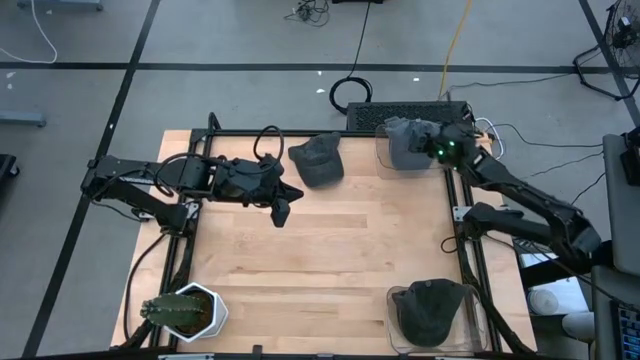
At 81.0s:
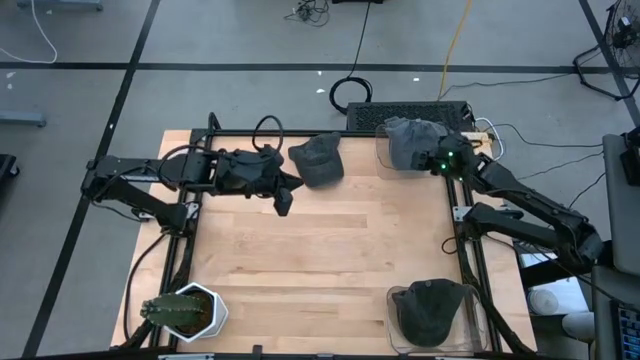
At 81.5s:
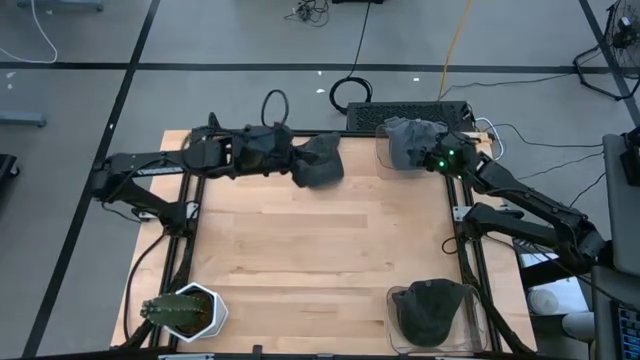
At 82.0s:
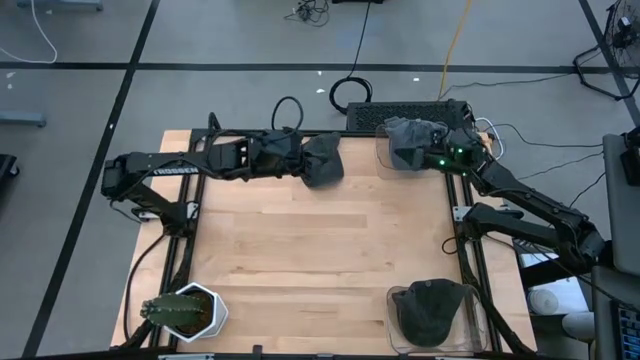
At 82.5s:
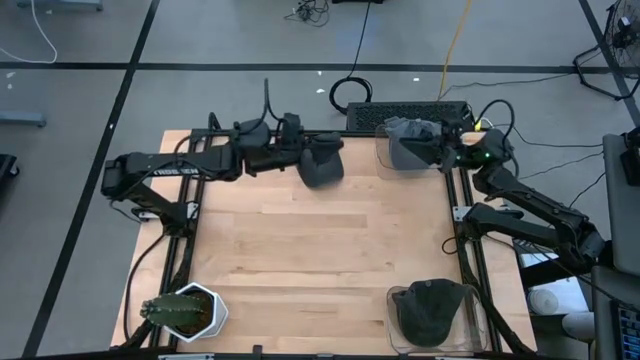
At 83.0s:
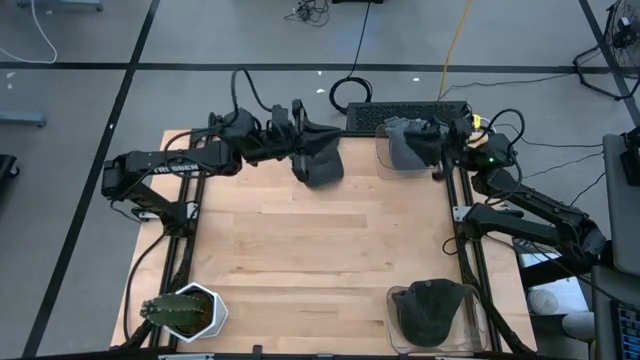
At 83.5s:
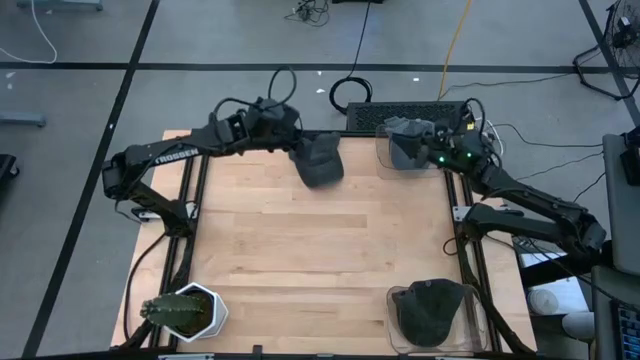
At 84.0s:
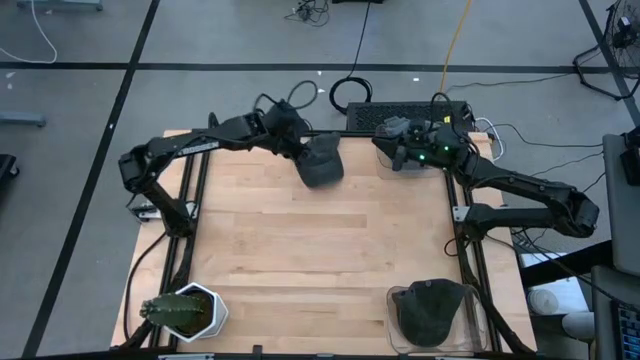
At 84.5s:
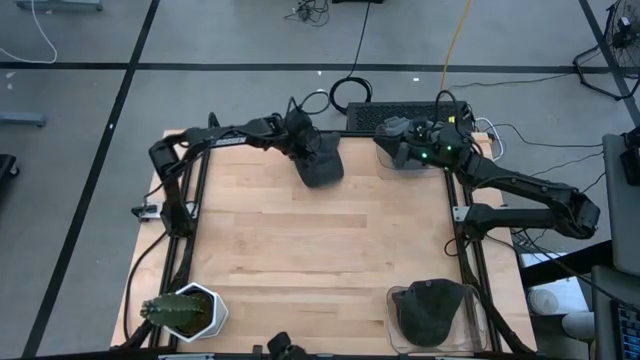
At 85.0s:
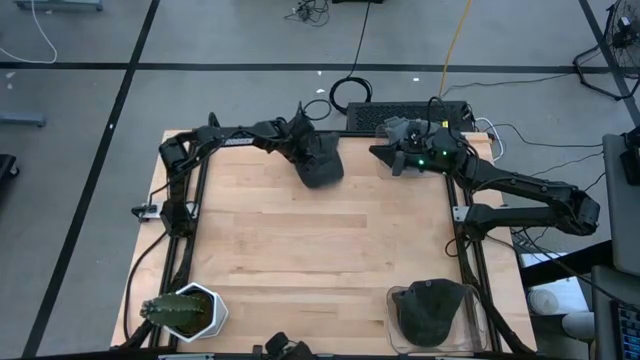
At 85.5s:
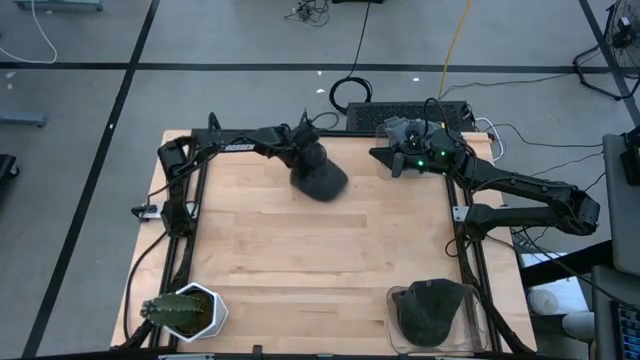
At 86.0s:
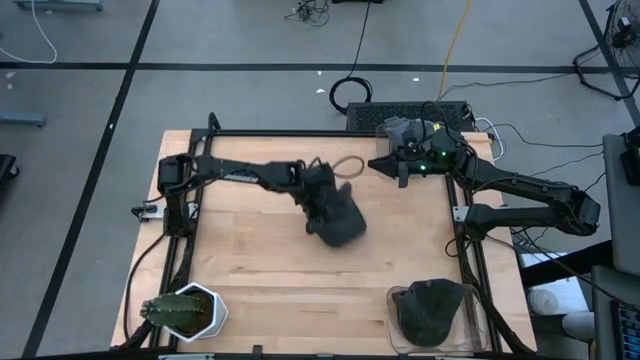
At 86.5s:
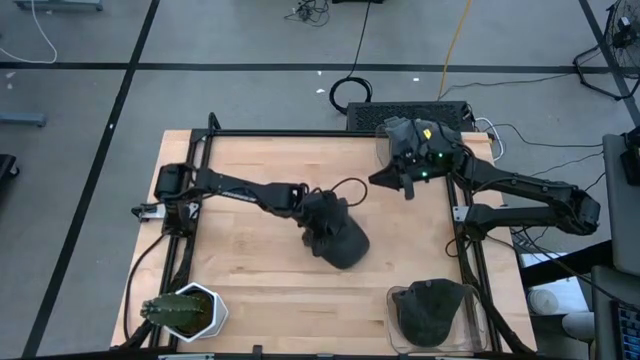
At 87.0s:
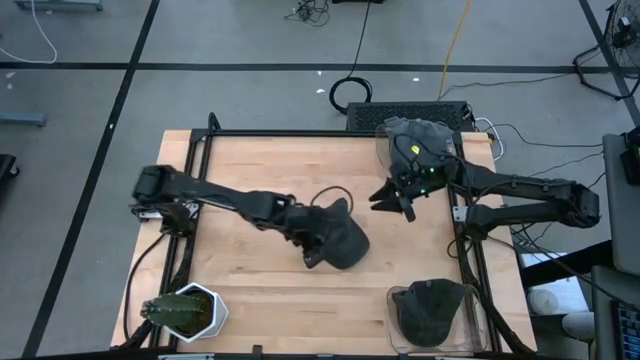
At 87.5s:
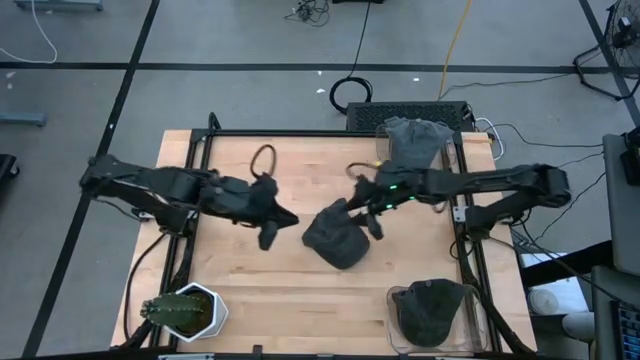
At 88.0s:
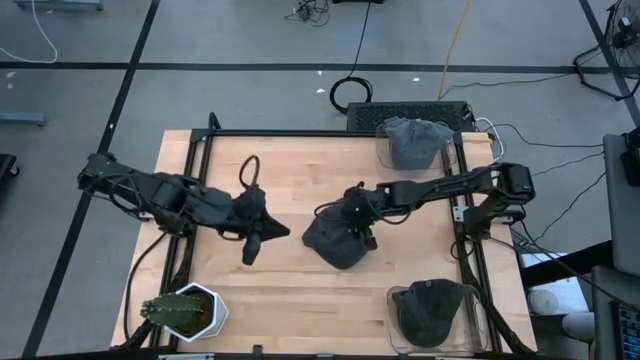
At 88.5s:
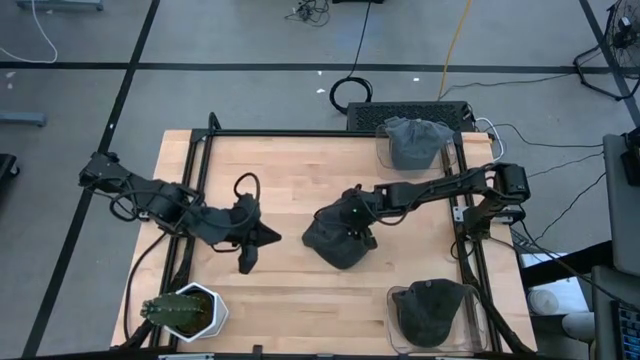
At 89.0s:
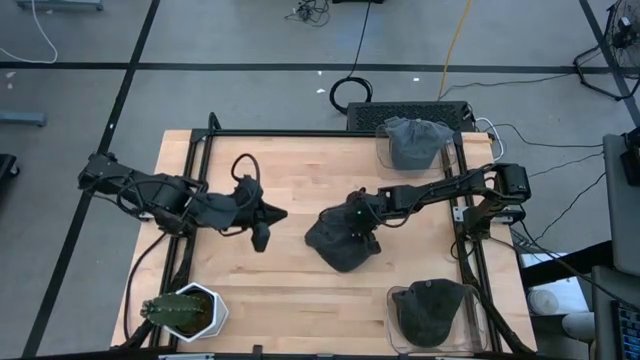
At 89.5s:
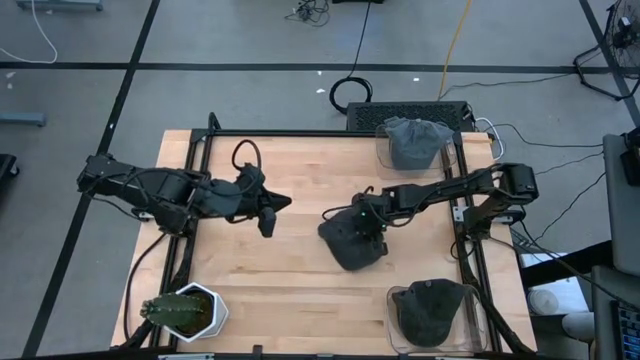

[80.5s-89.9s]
Task: Pick & Place hat
Put the black cap into the bottom transparent bin

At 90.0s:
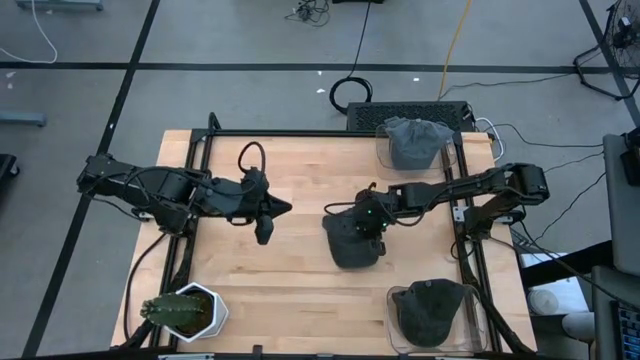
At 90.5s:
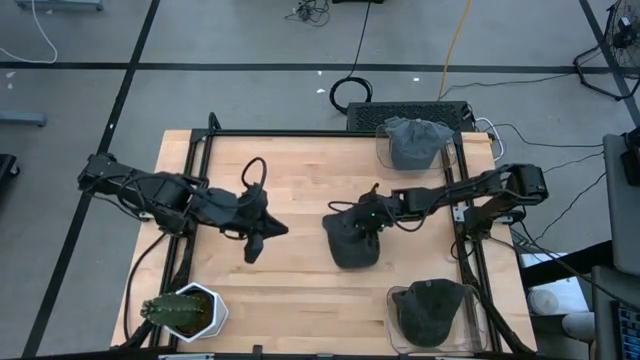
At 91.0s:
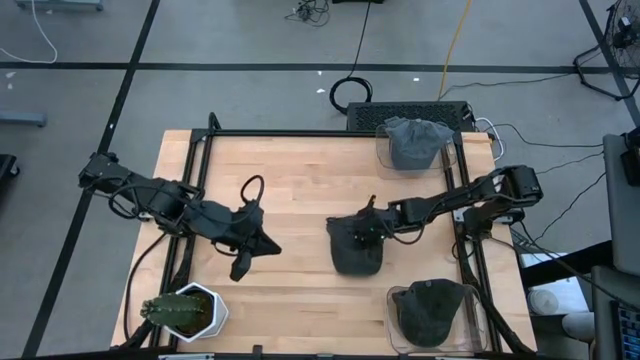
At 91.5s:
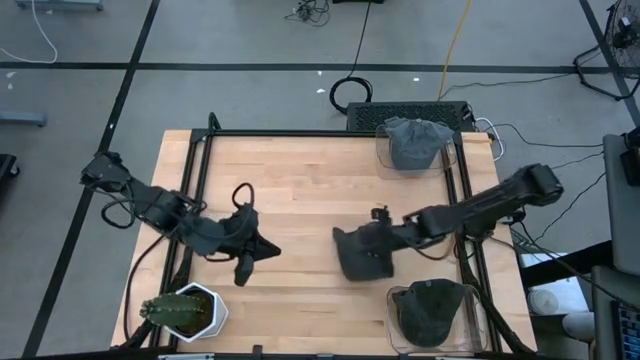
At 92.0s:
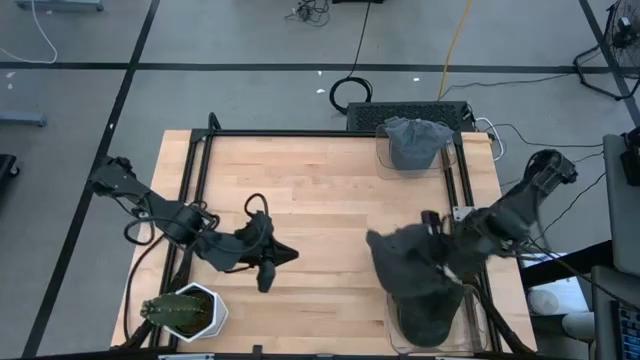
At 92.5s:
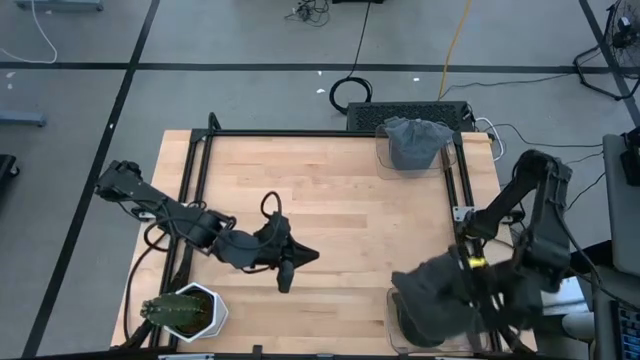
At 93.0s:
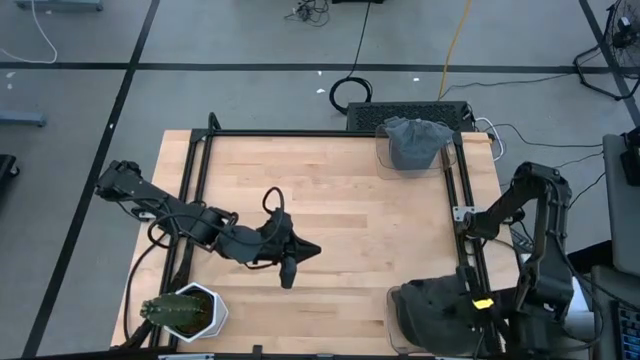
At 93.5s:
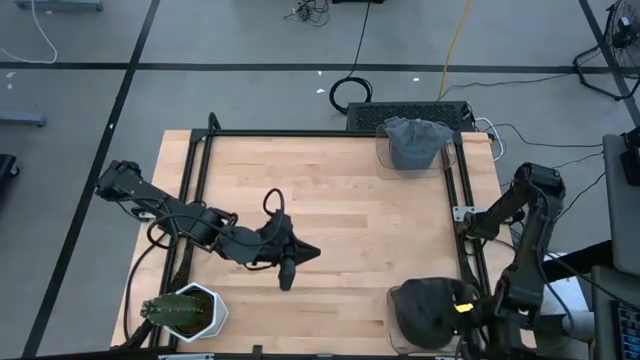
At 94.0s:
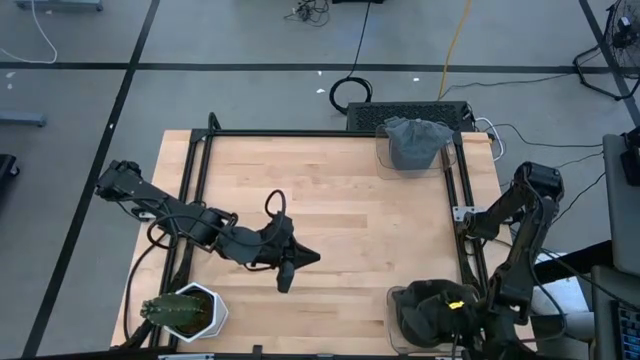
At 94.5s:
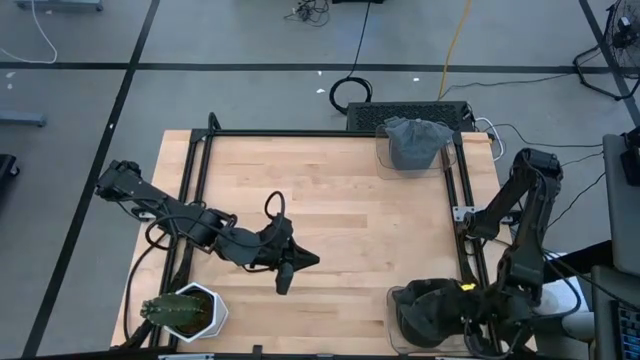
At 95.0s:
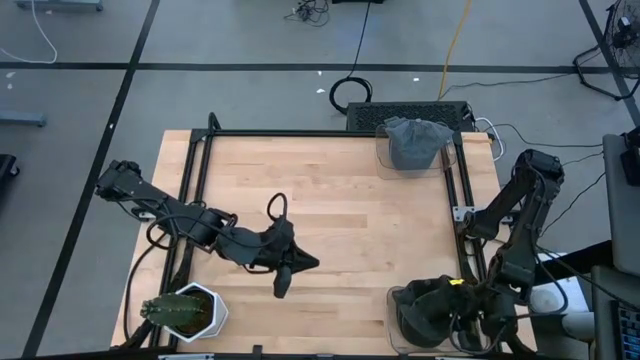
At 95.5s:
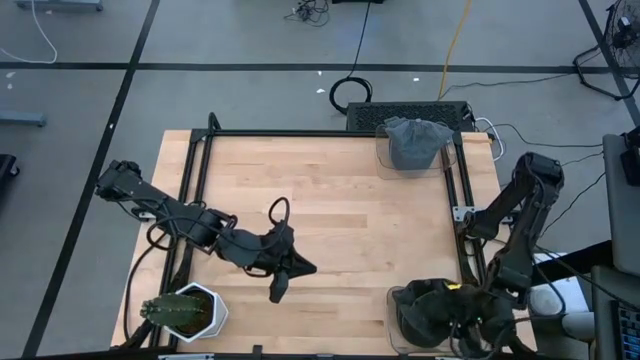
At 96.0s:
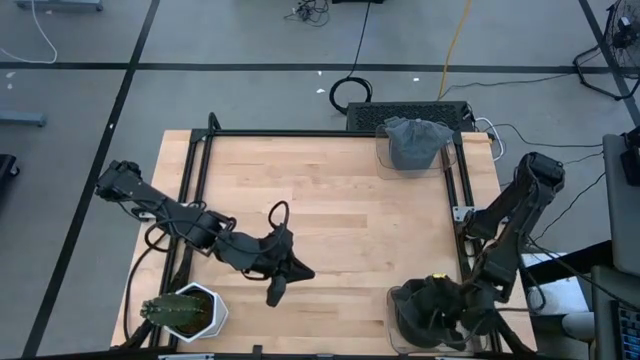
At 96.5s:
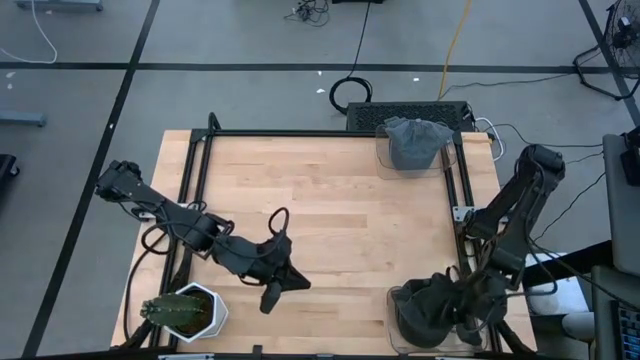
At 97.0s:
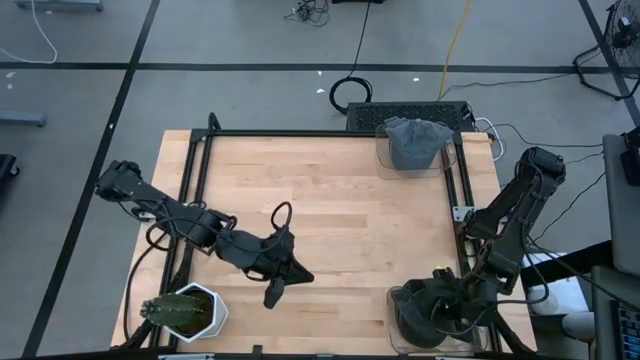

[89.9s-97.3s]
Put the black cap into the bottom transparent bin

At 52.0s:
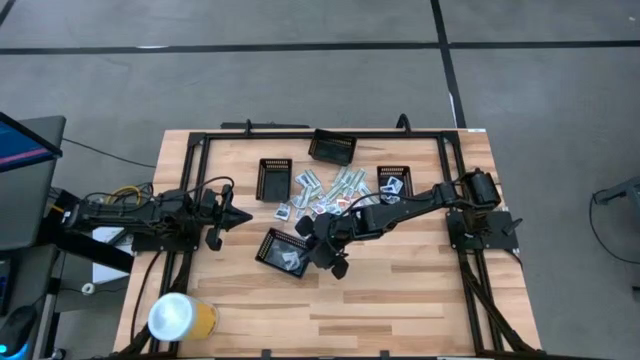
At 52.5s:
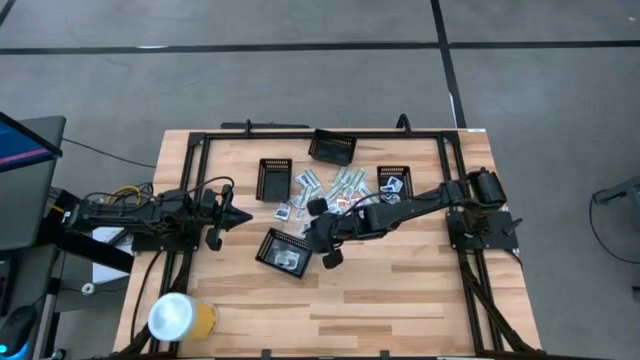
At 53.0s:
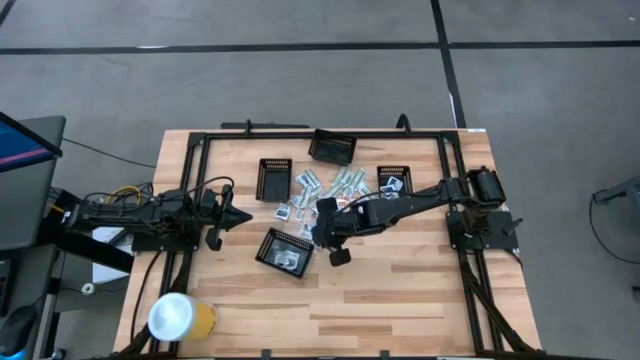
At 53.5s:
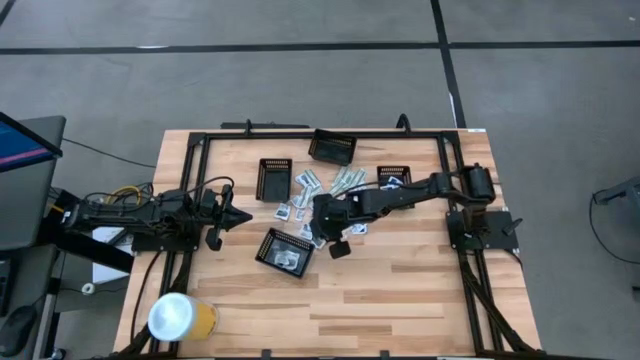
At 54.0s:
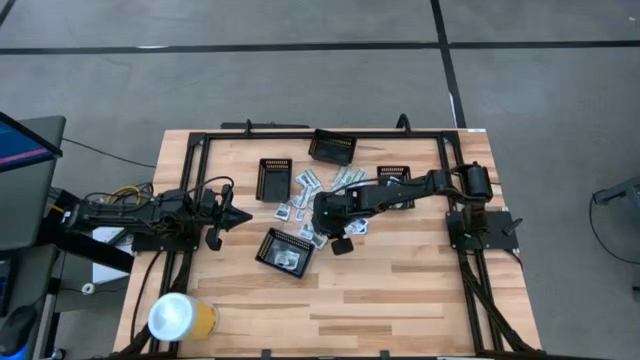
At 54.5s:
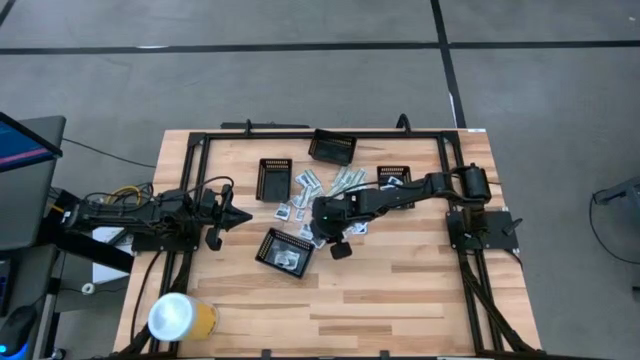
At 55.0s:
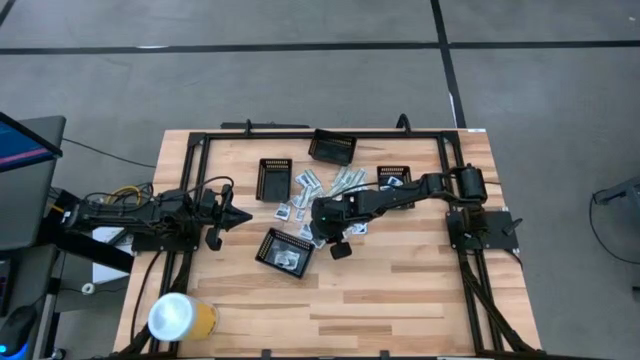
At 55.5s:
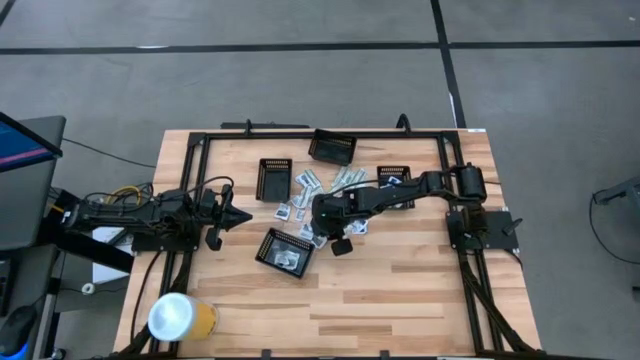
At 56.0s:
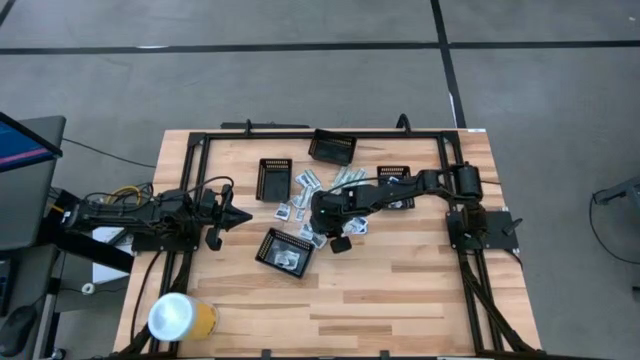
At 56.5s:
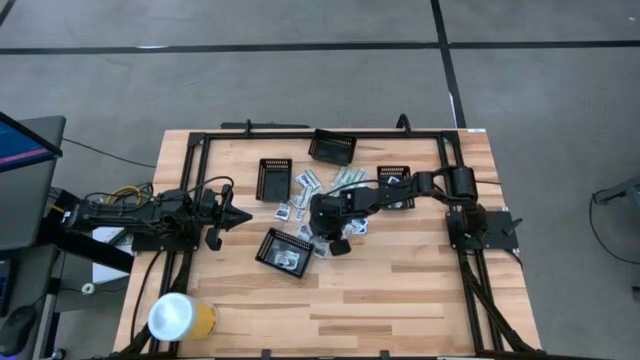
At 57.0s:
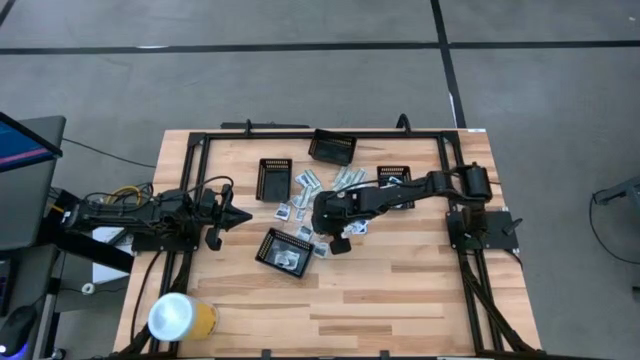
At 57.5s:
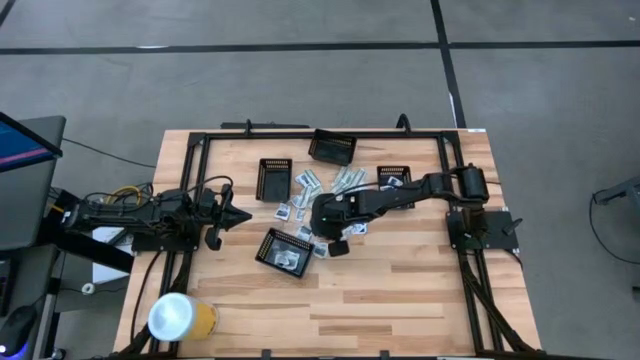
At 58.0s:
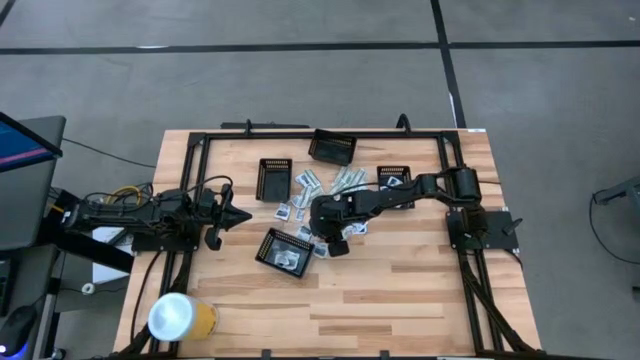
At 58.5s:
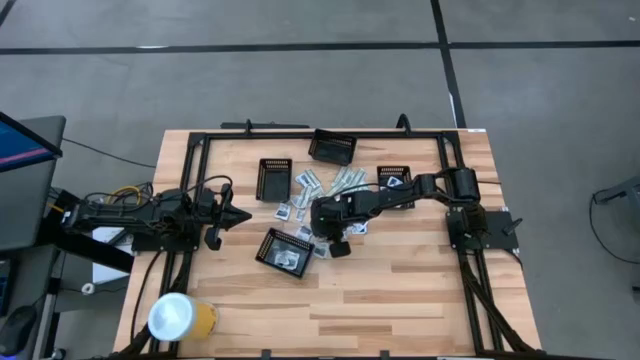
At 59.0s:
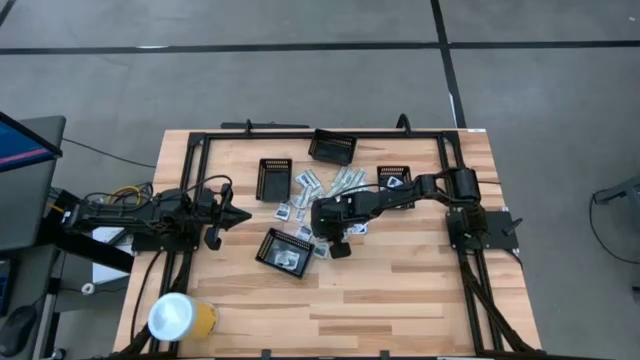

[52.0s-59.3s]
Task: Pick & Place First Aid Supplies
Put the white towelette pack into the bottom black bin
